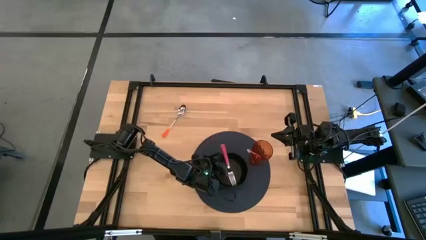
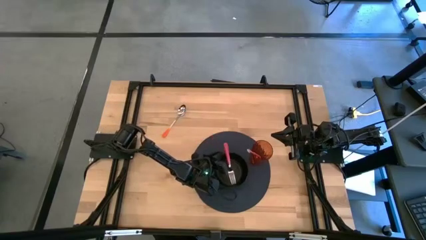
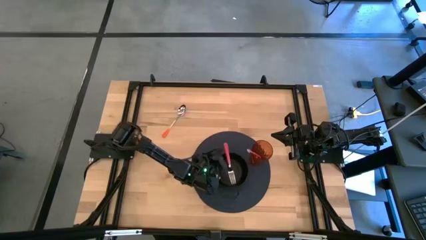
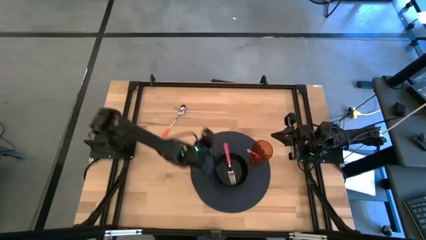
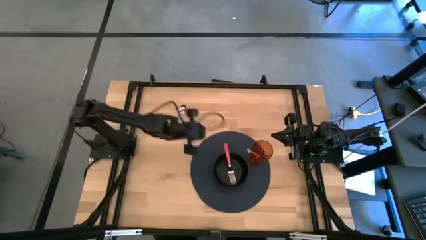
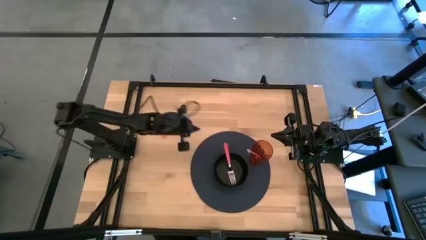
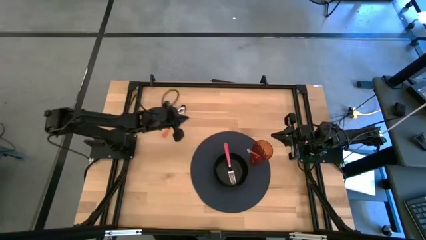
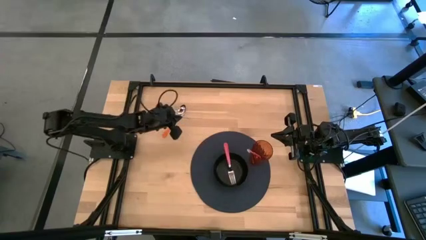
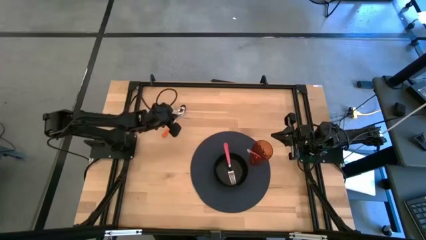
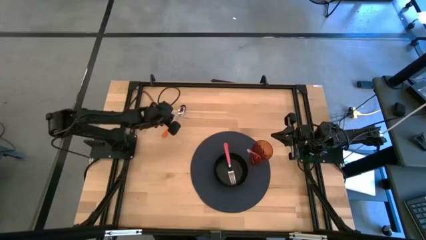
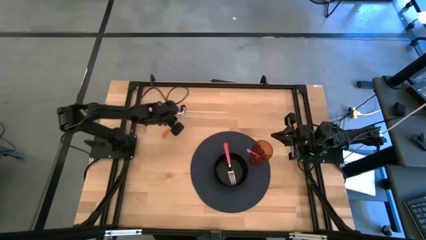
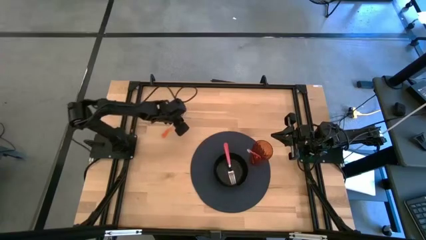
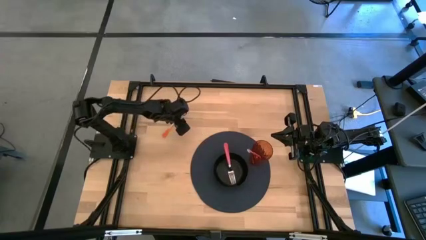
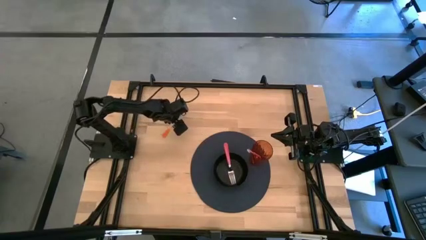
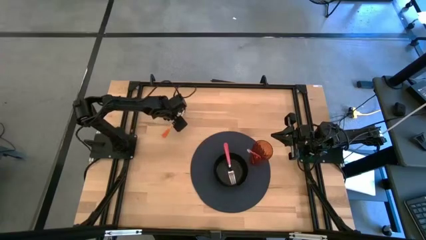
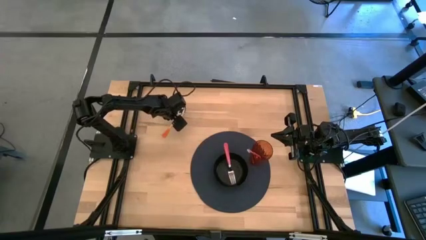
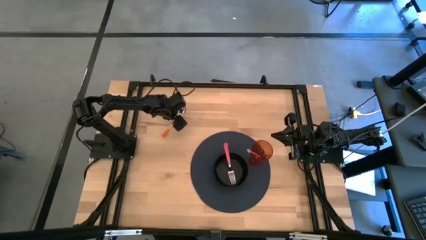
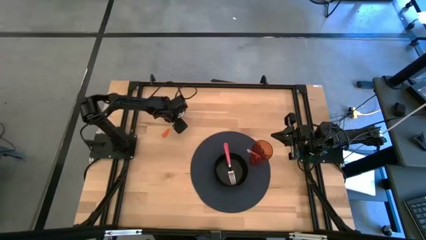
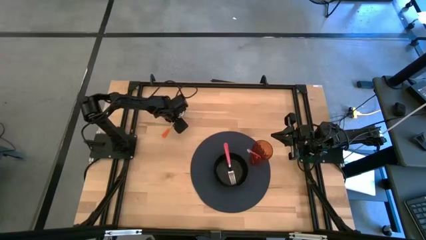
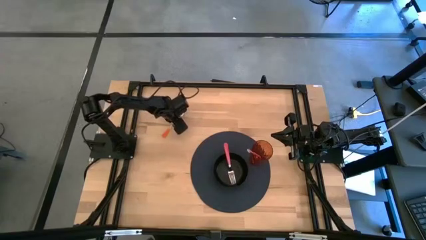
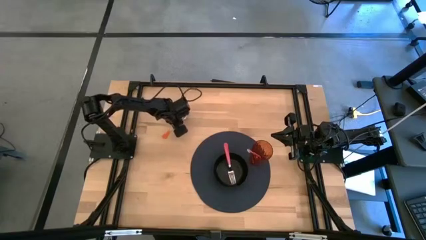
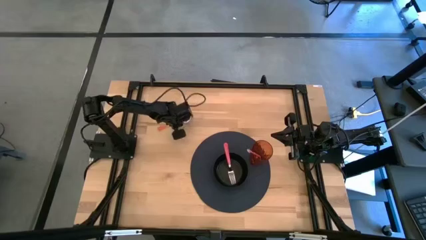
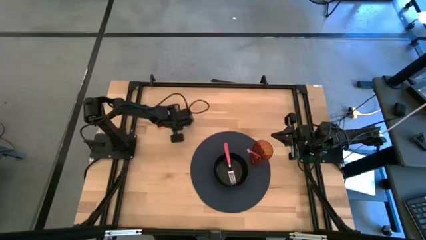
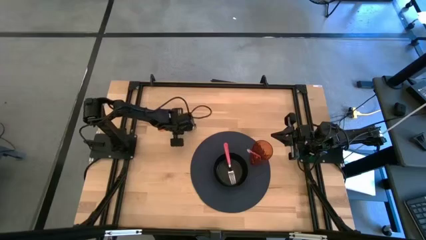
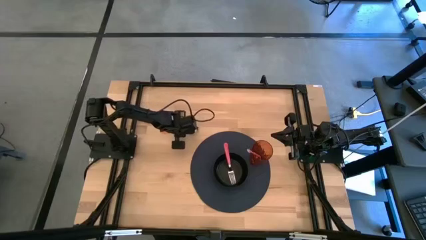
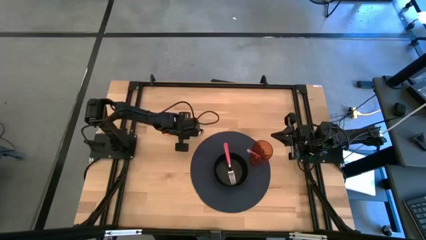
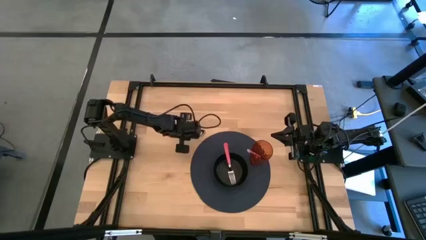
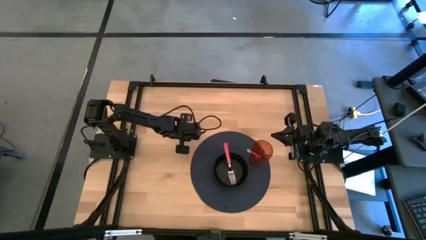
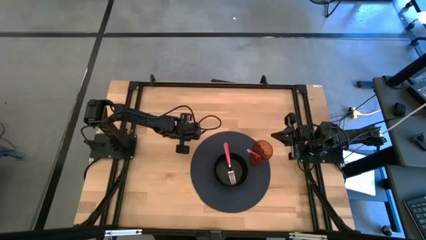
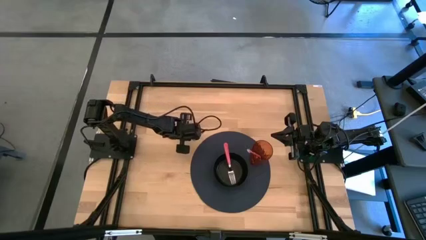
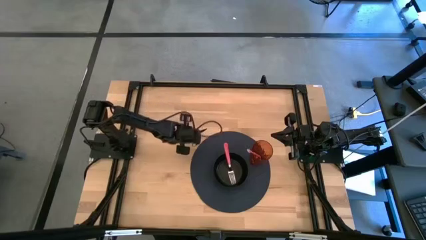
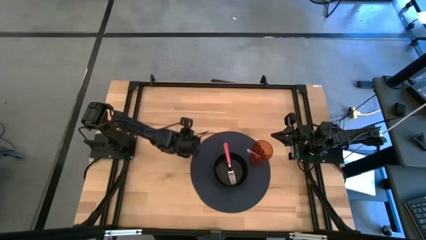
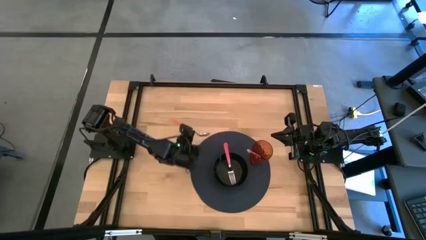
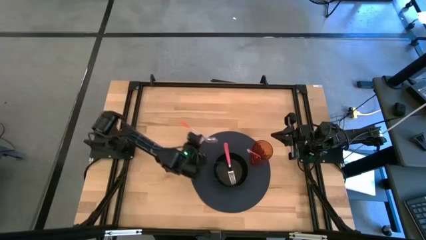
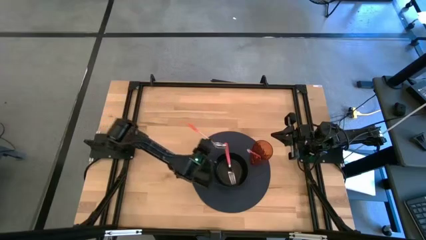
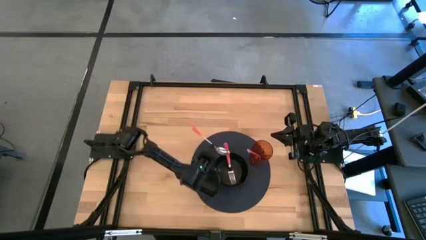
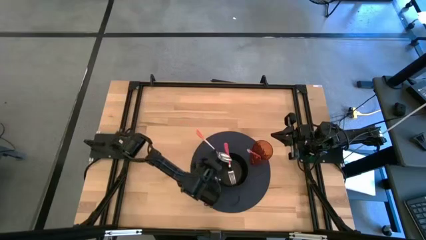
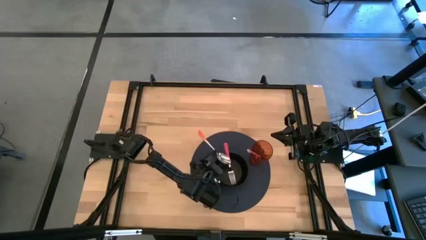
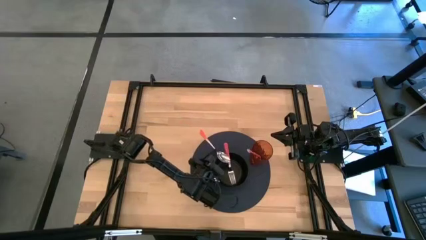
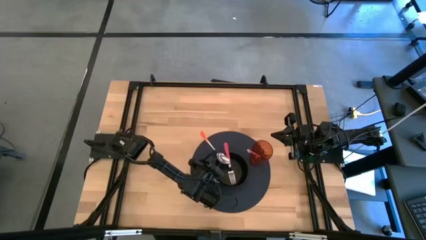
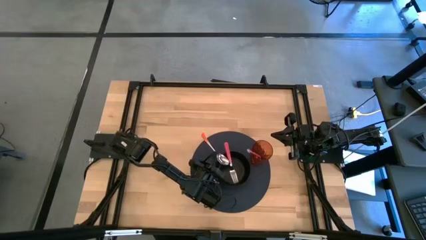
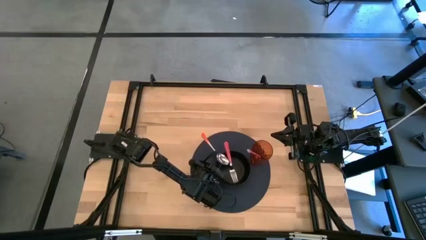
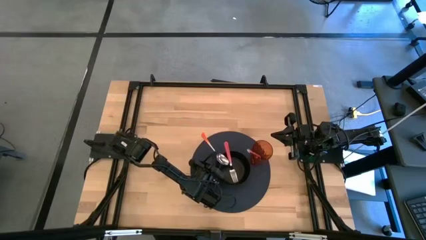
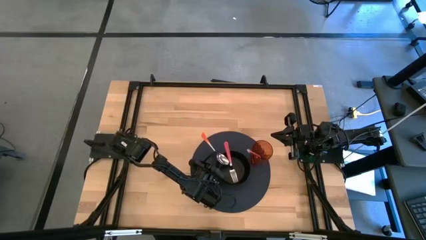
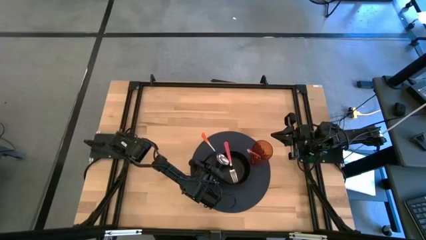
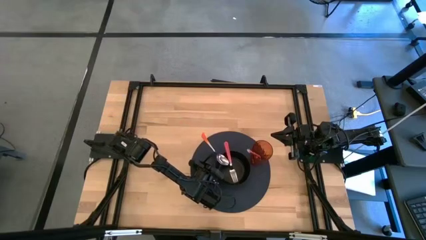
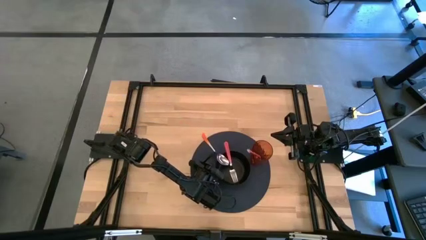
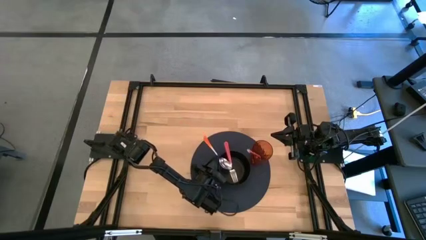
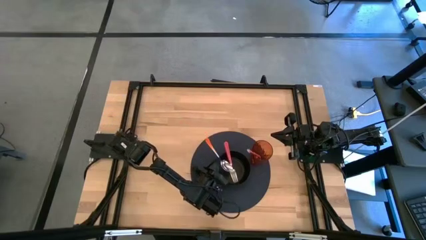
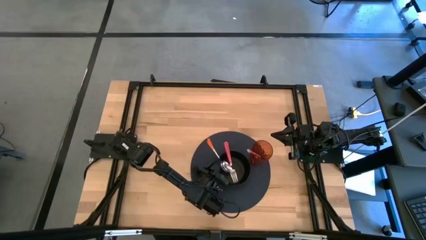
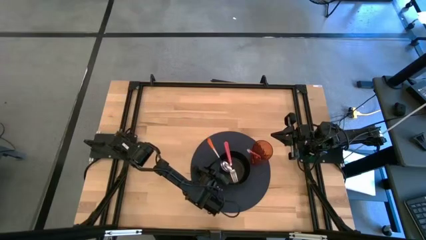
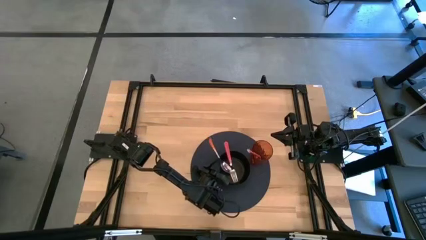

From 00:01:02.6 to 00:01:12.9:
Task: Pick & Place Utensil
Put the orange spoon into the black bowl on the blue mat

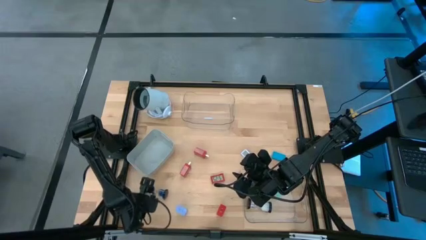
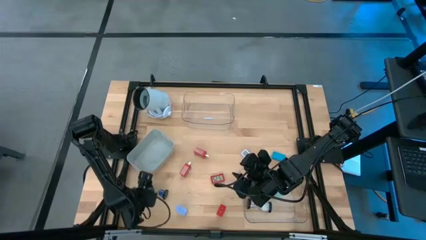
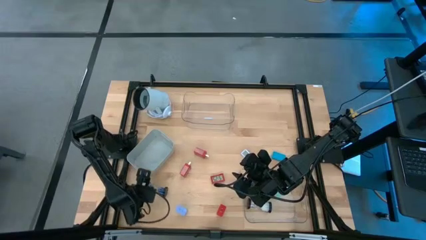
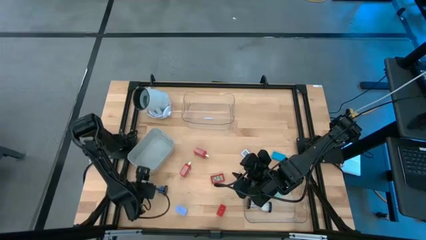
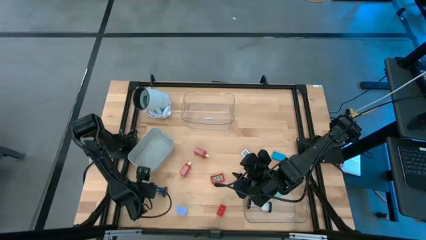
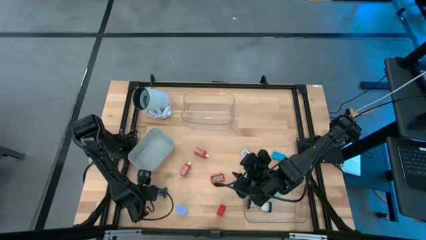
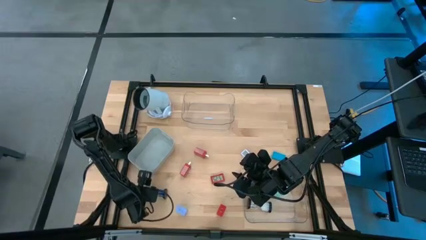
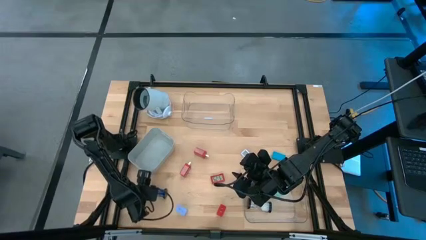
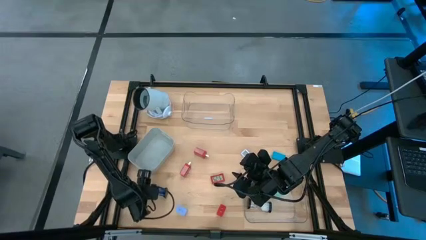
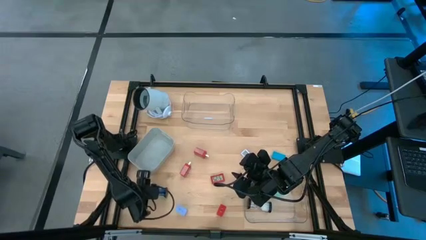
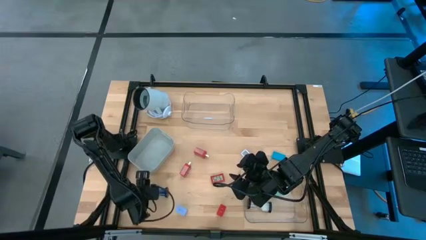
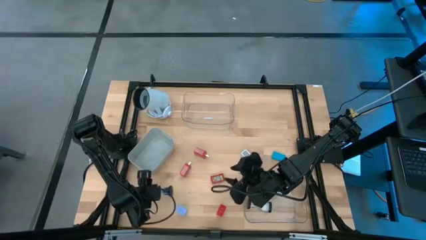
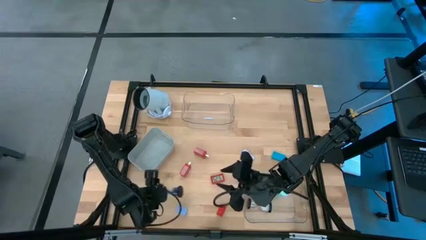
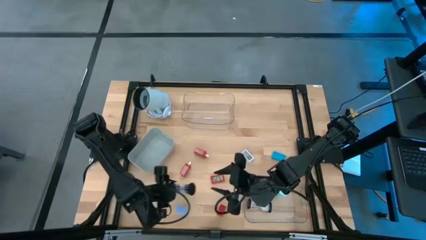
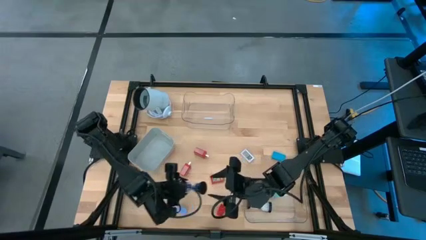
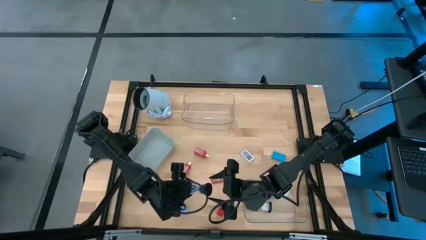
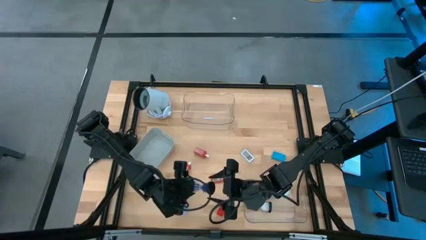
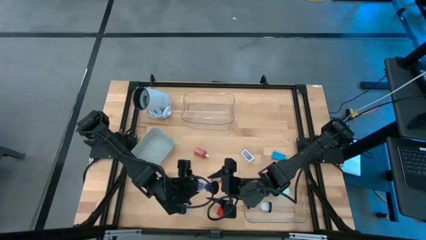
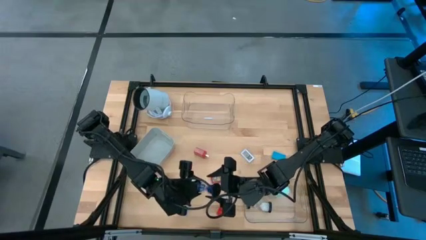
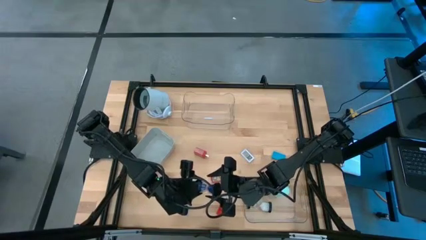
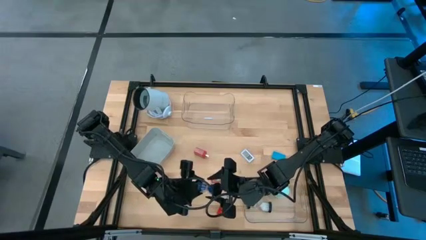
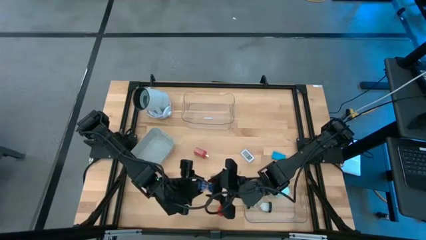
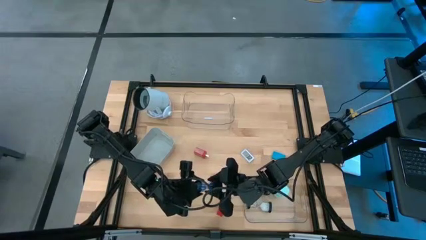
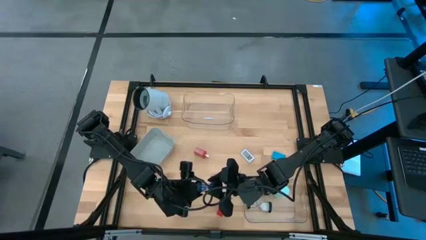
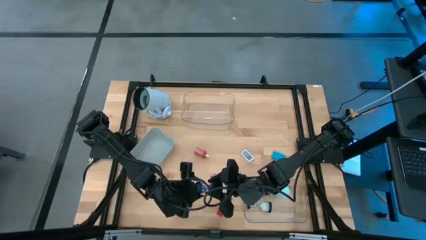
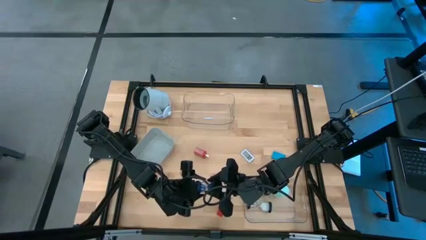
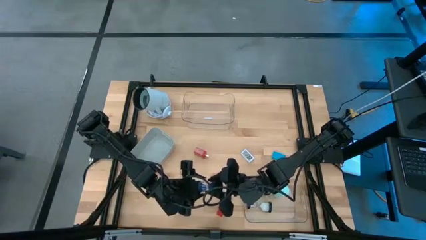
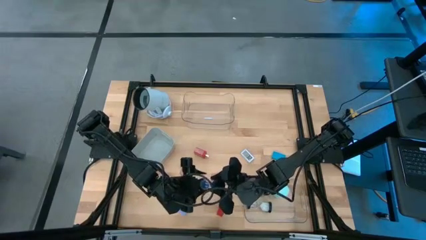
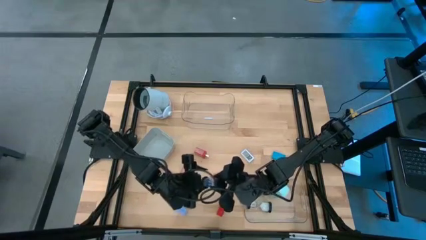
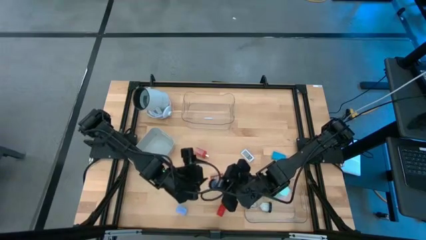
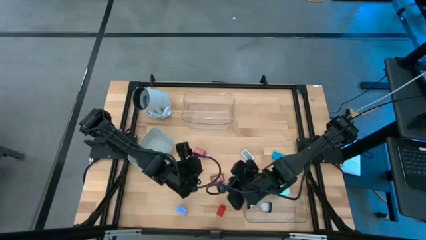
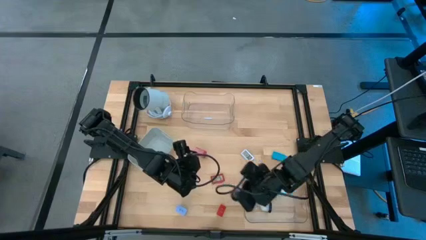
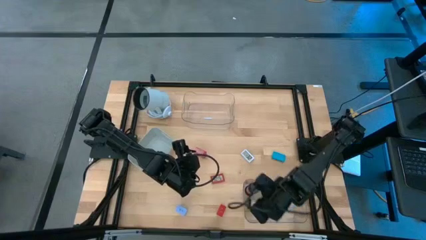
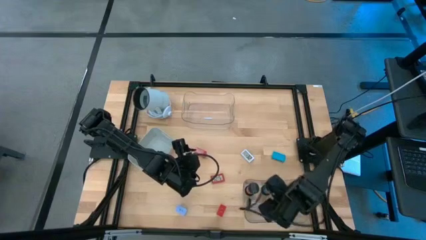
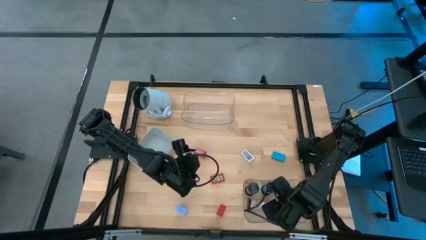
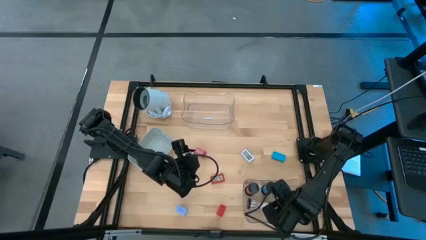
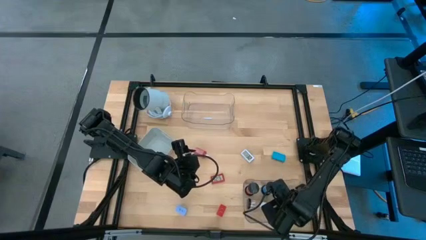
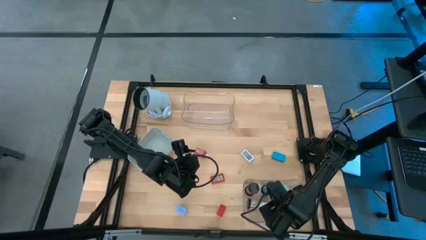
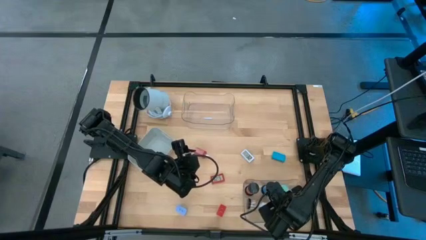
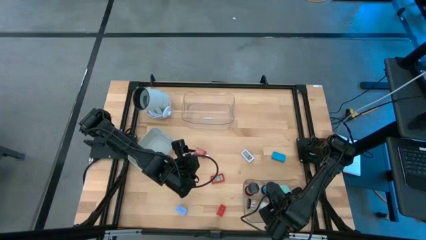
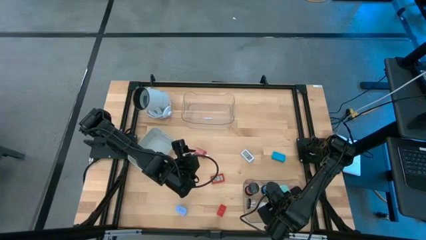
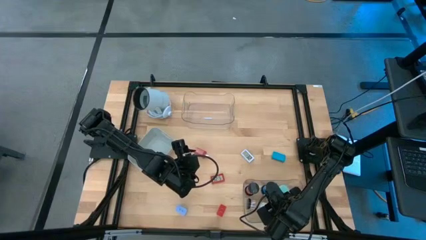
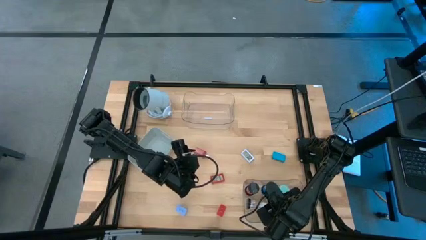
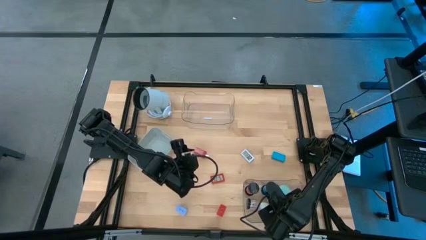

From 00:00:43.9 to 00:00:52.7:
Task: Pick & Place Office items
Put the dark blue hourglass into the bottom transparent bin
